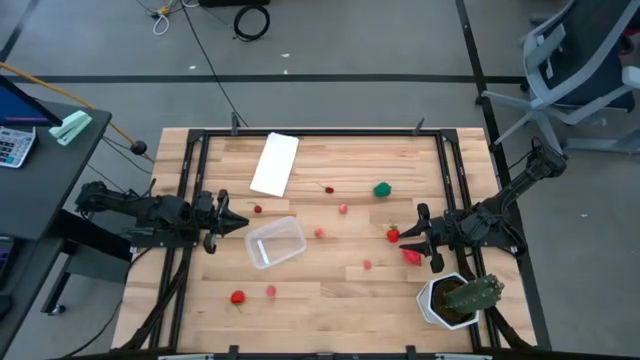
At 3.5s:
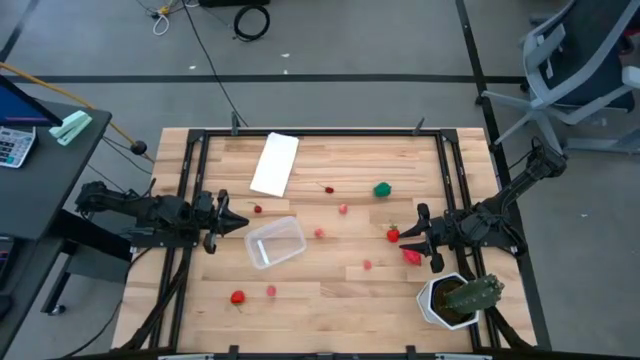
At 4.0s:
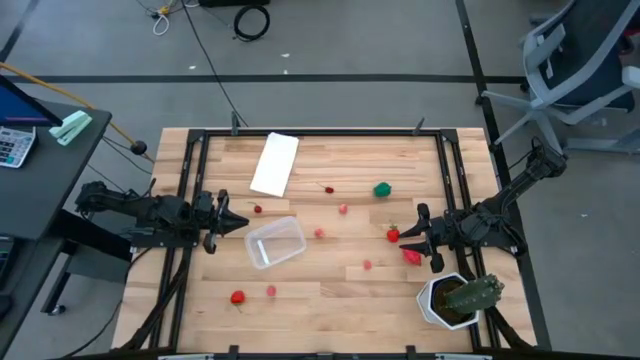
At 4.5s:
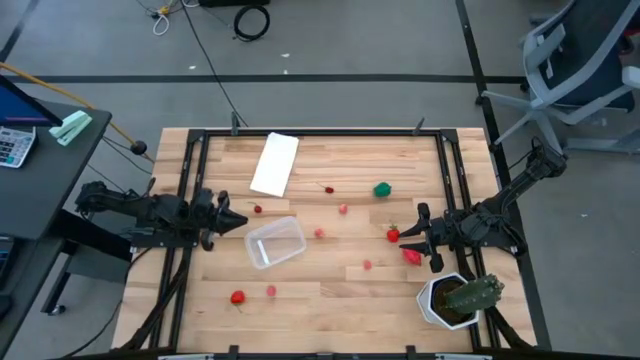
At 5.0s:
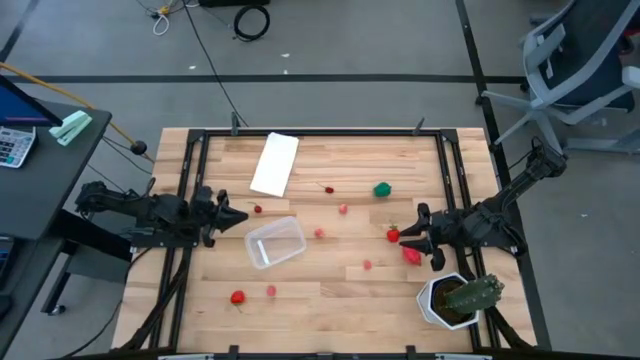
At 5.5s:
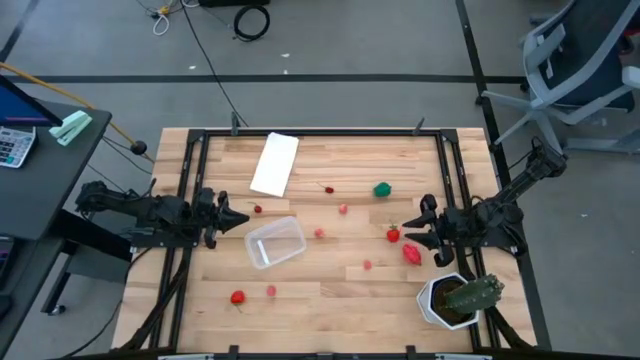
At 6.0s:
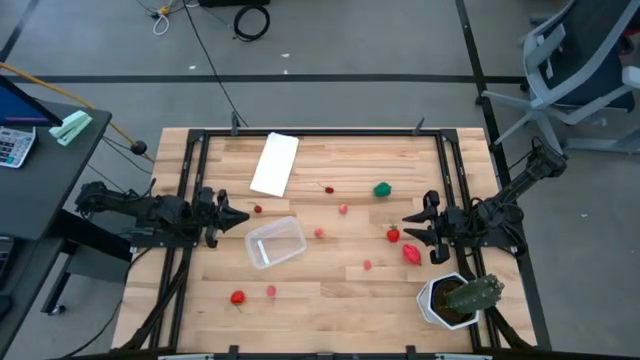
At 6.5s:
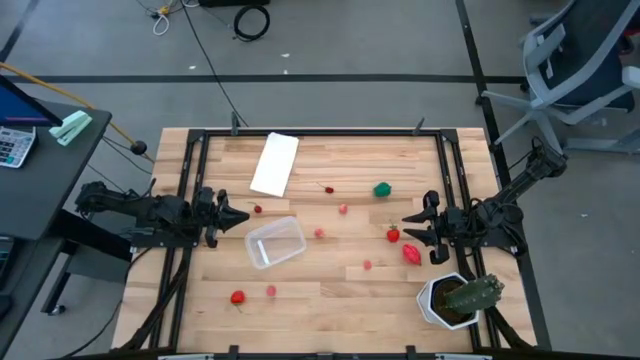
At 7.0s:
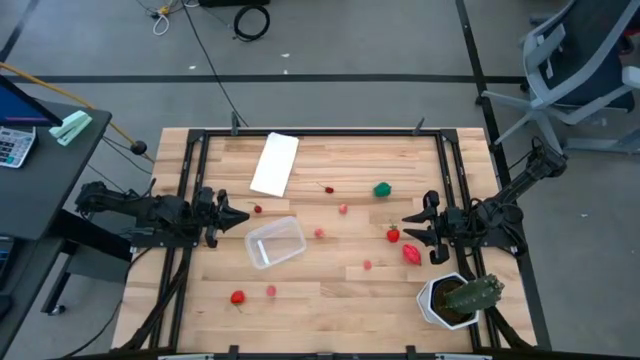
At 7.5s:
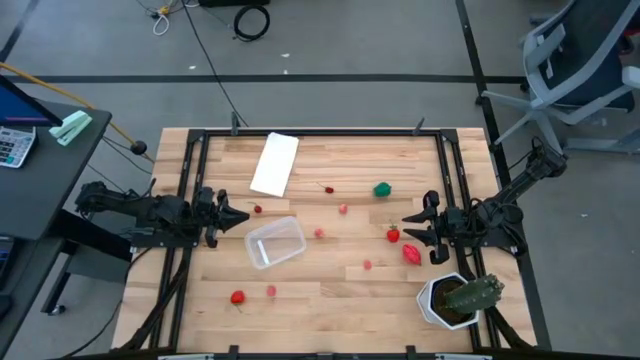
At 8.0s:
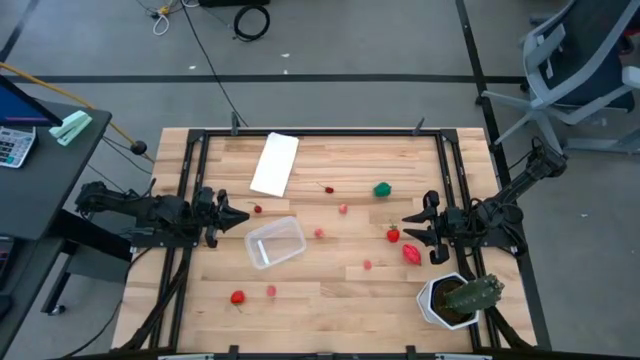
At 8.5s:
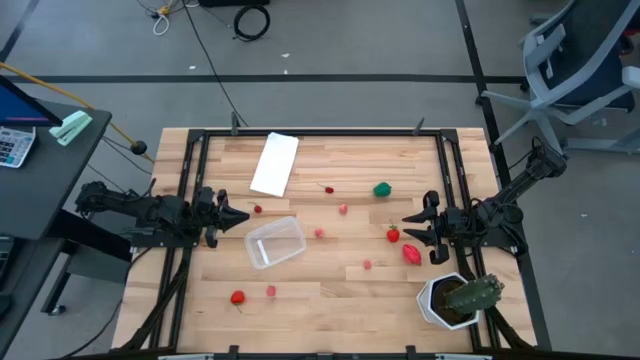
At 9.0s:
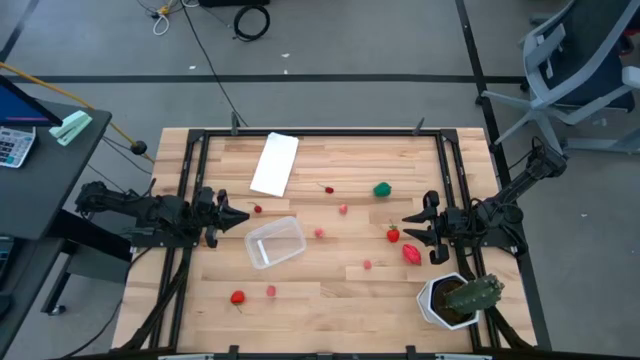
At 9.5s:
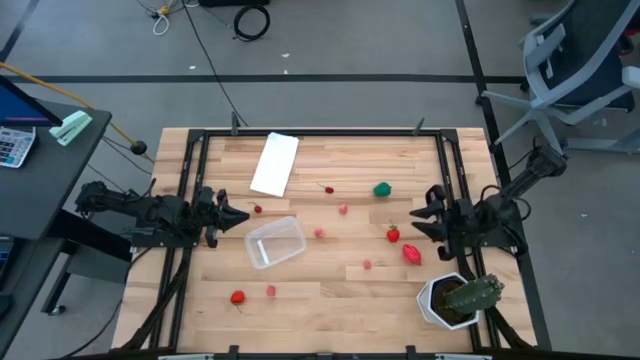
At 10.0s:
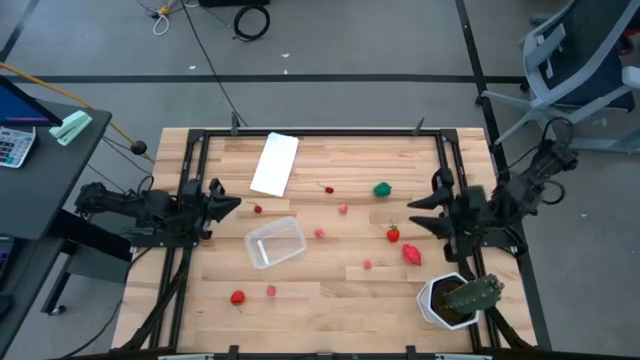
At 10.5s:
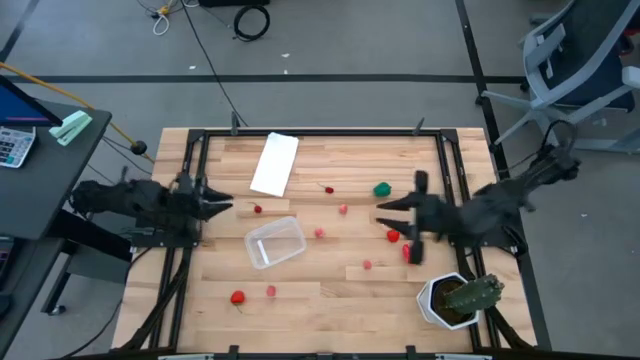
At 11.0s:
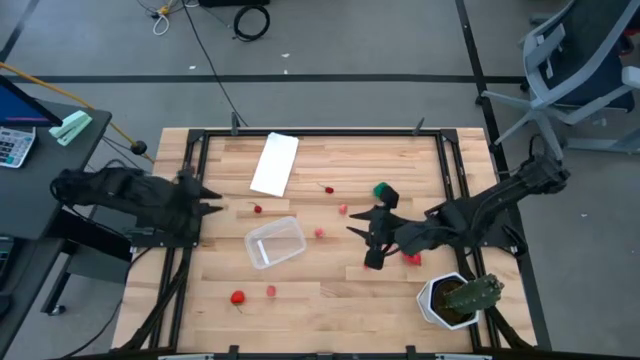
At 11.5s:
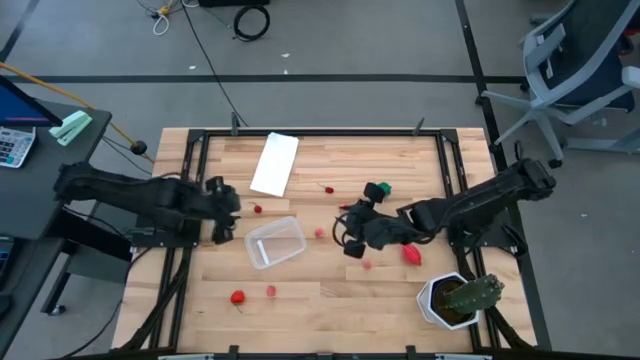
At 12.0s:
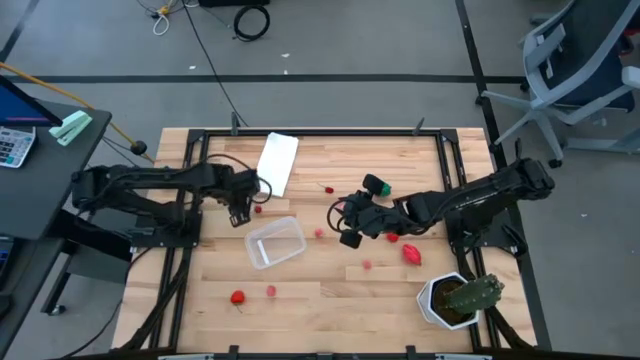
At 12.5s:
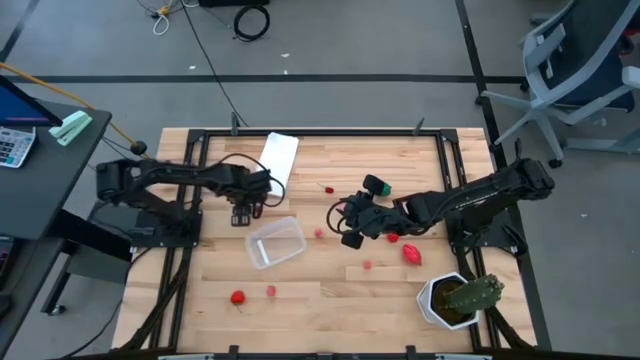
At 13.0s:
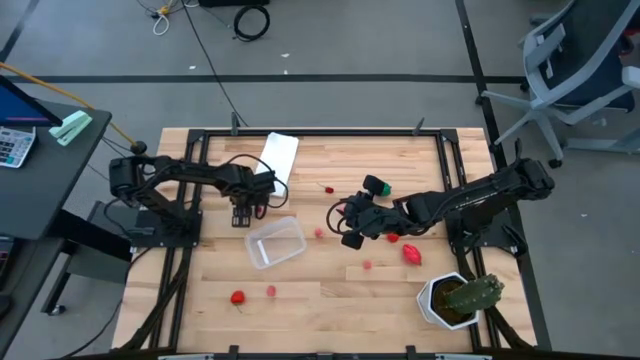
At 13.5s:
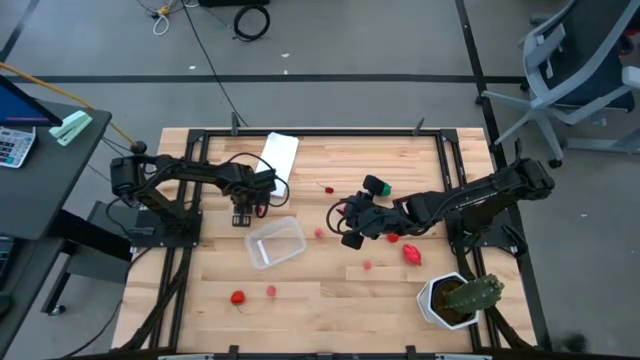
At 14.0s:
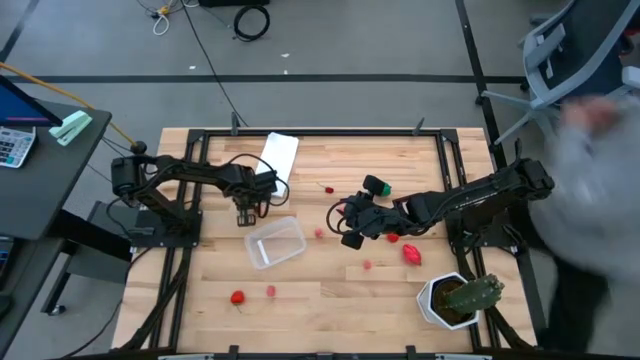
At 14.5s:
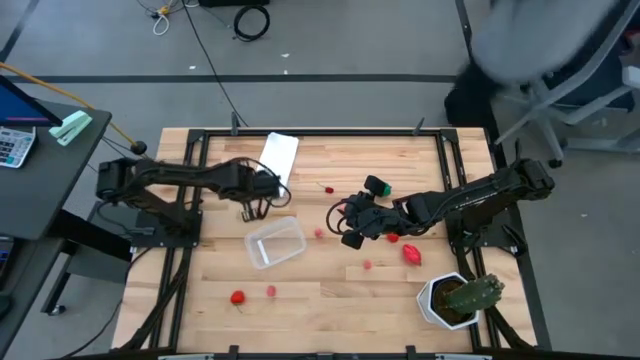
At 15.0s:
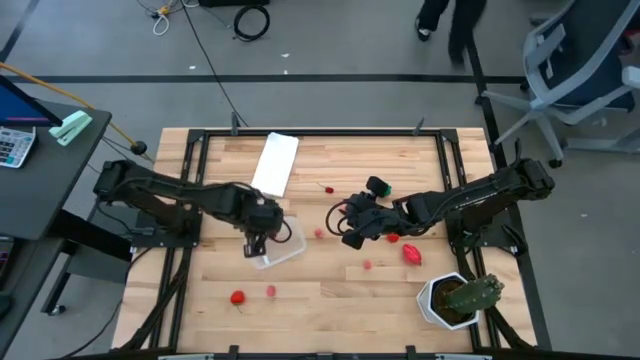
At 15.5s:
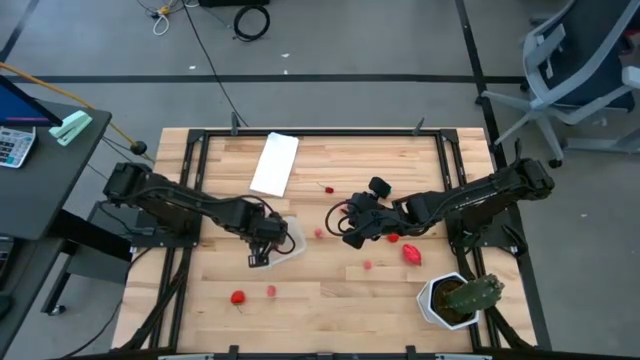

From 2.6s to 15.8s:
Task: Pick and placing Produce into tupperware
Put the cherry into the transparent bin

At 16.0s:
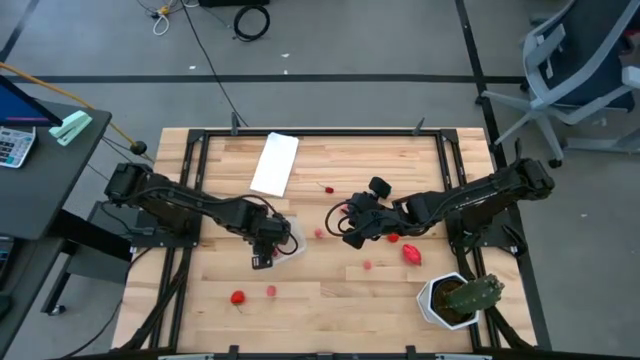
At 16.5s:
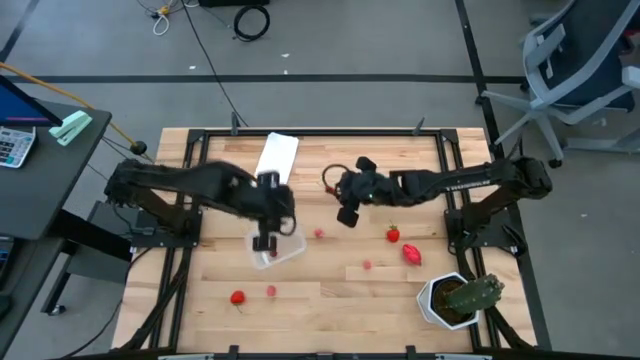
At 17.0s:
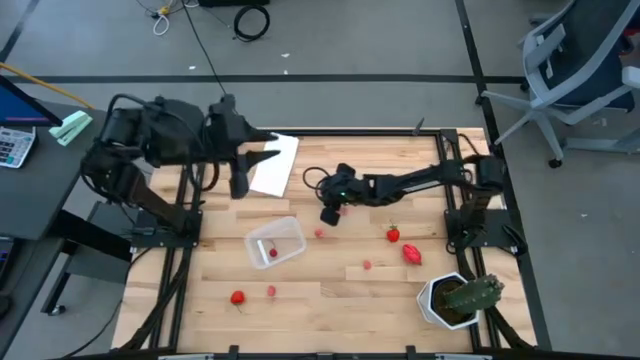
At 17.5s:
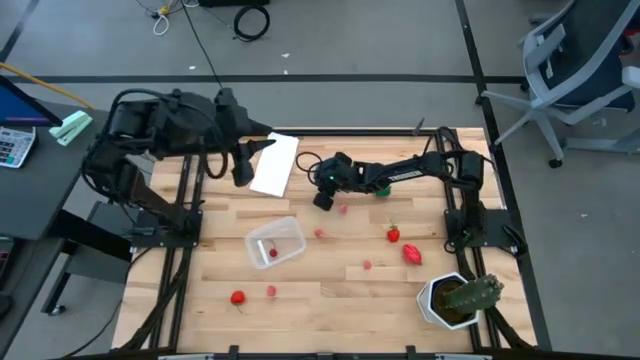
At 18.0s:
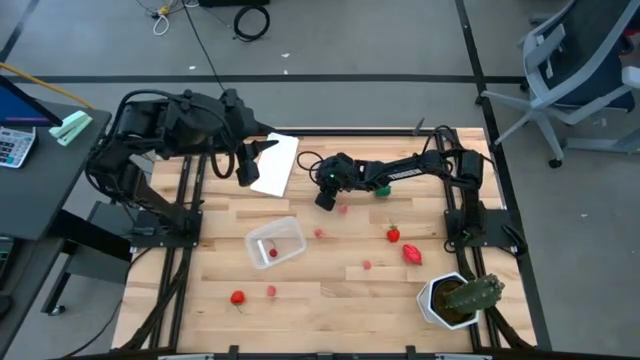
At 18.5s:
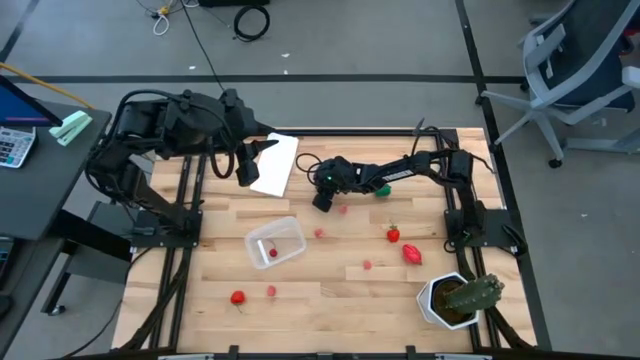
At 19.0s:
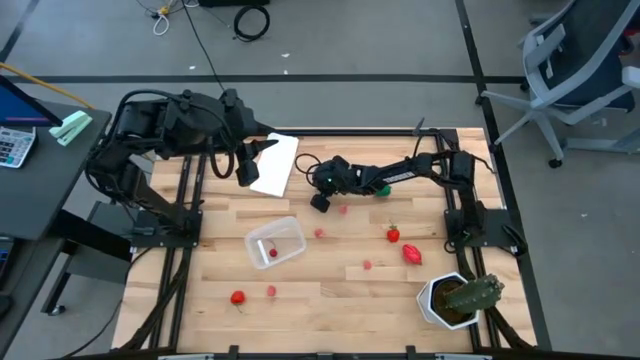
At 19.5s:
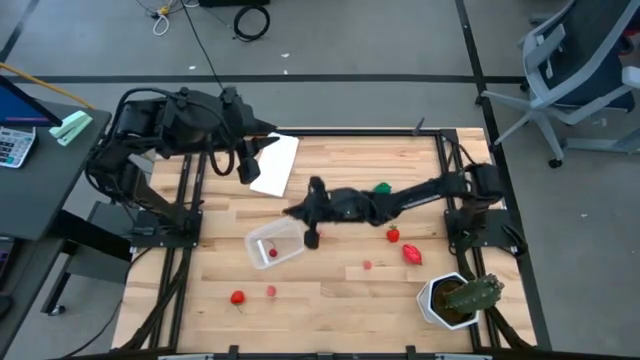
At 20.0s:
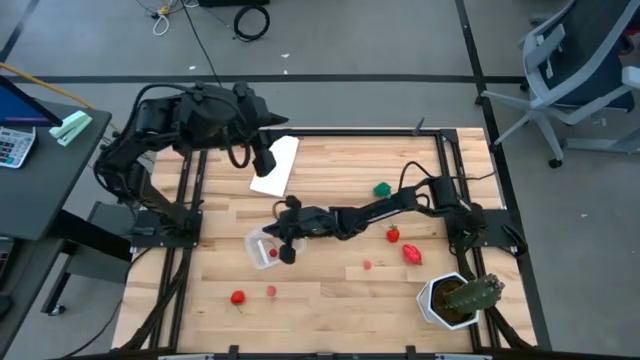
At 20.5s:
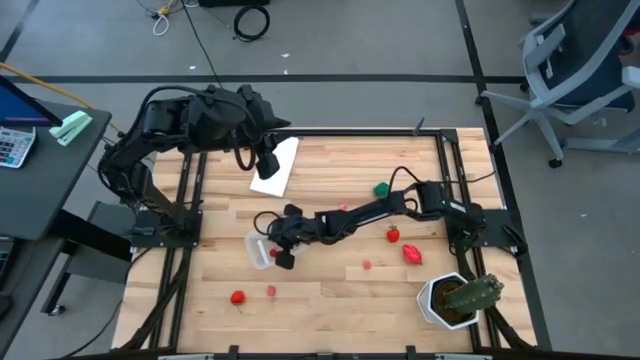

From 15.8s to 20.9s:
Put the cherry into the transparent bin

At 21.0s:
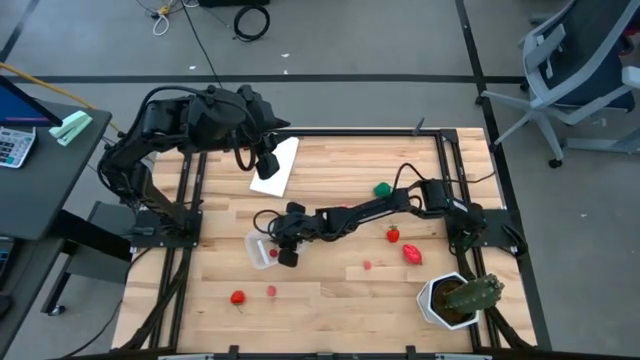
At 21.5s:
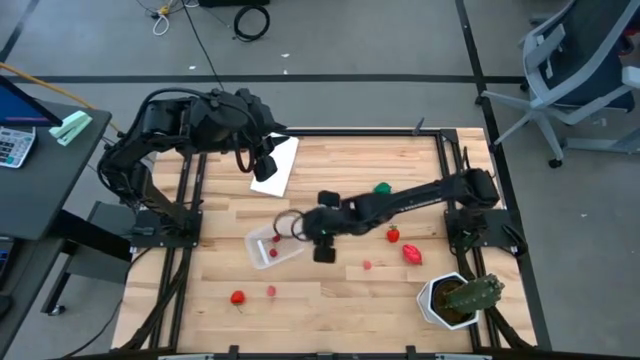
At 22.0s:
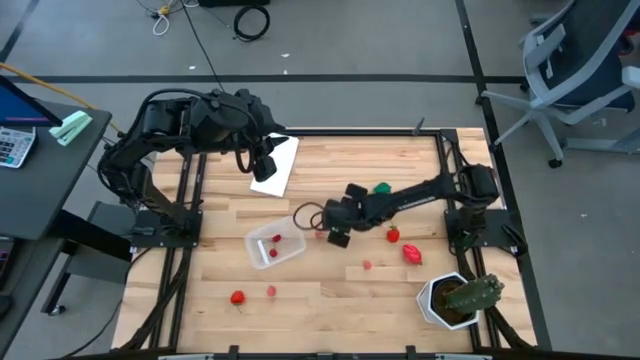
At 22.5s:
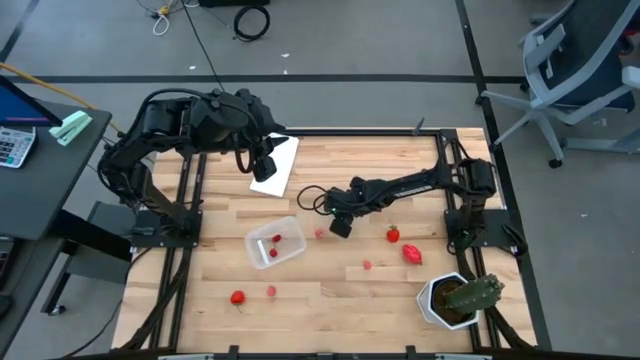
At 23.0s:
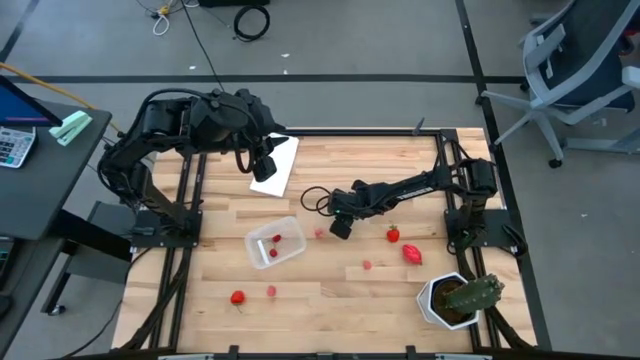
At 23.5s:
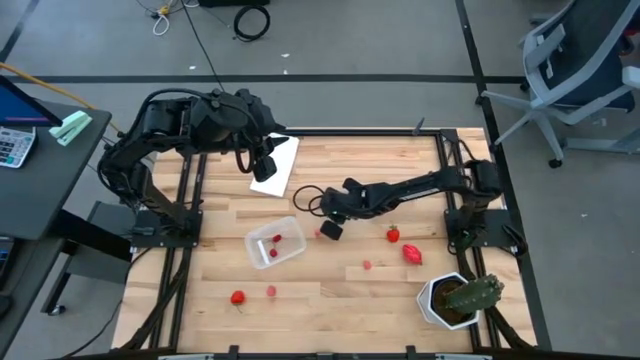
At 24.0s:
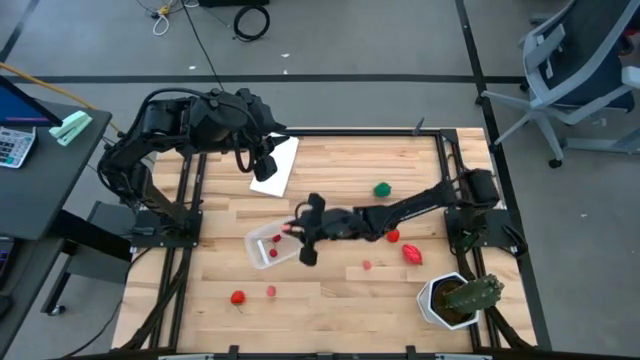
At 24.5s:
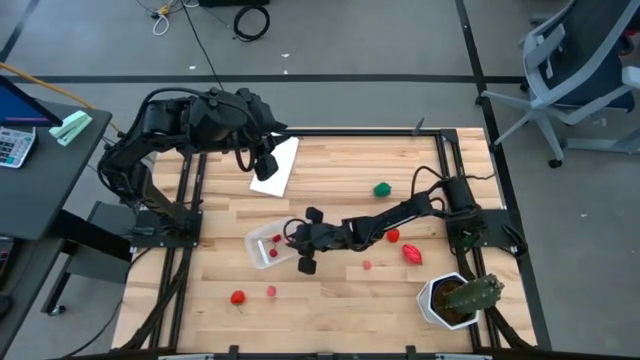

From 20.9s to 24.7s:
Put the peach into the transparent bin
